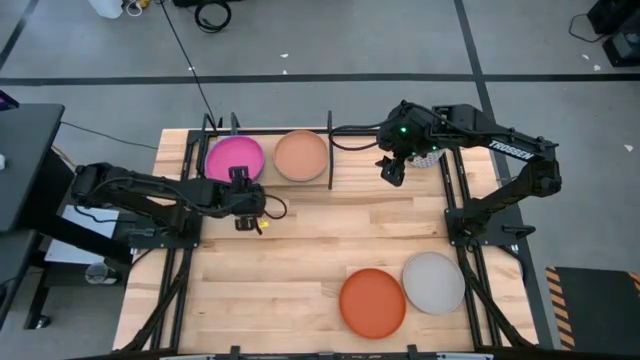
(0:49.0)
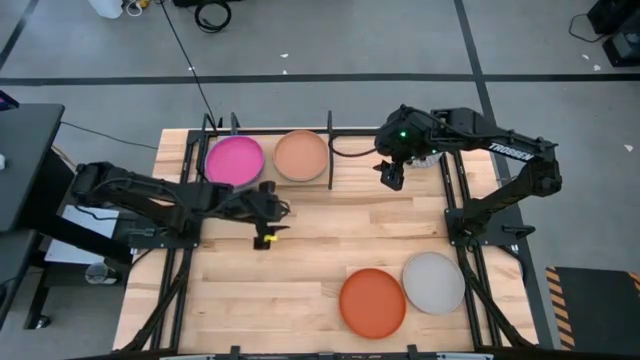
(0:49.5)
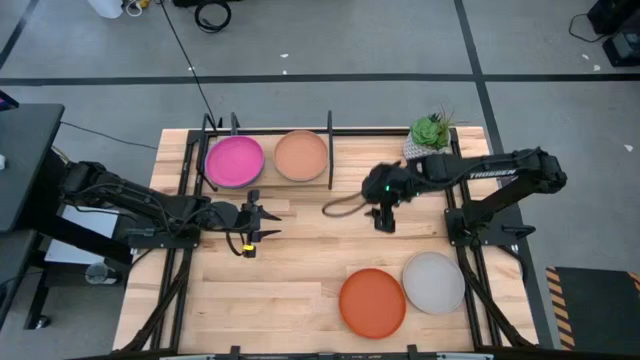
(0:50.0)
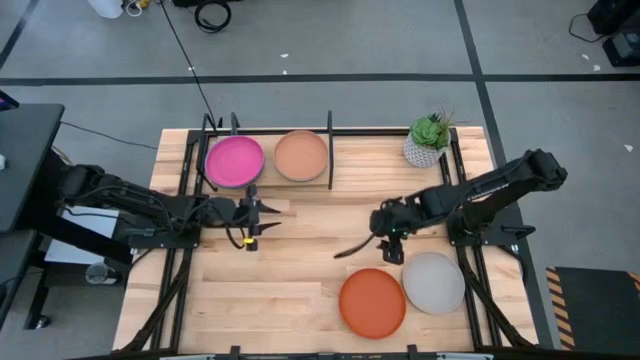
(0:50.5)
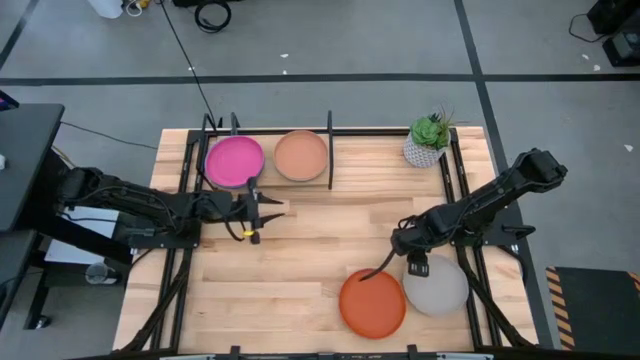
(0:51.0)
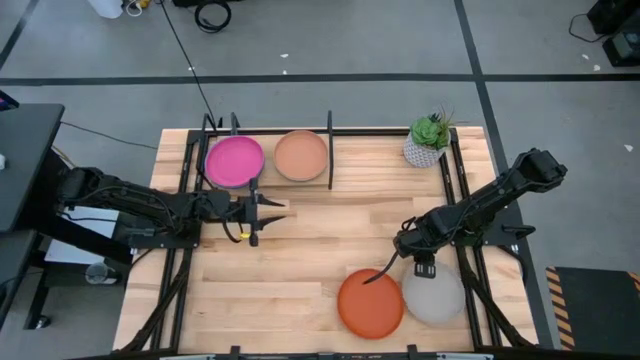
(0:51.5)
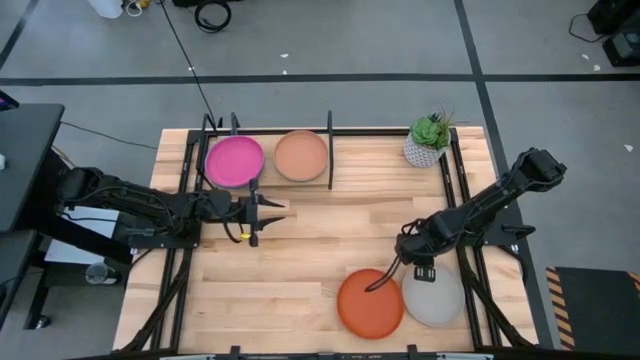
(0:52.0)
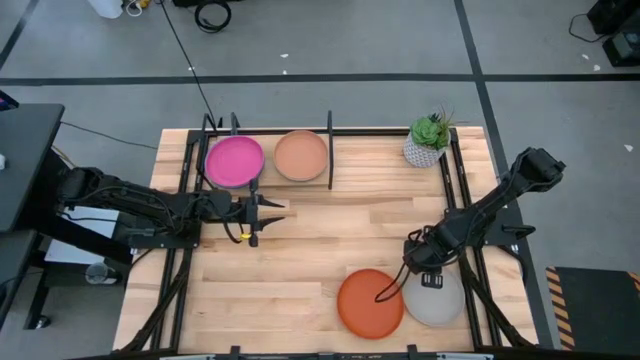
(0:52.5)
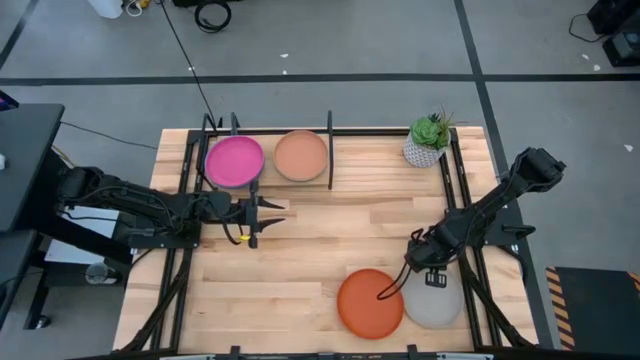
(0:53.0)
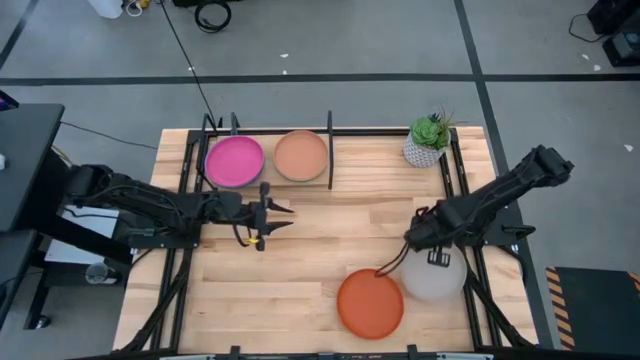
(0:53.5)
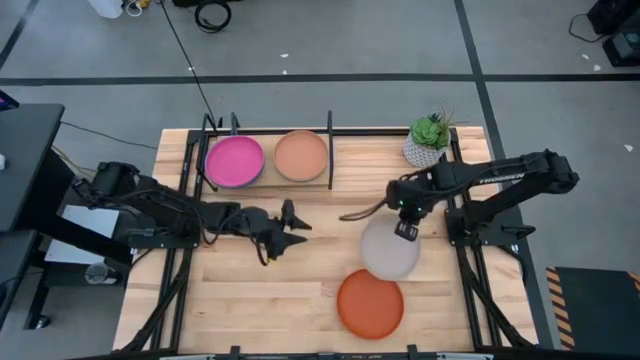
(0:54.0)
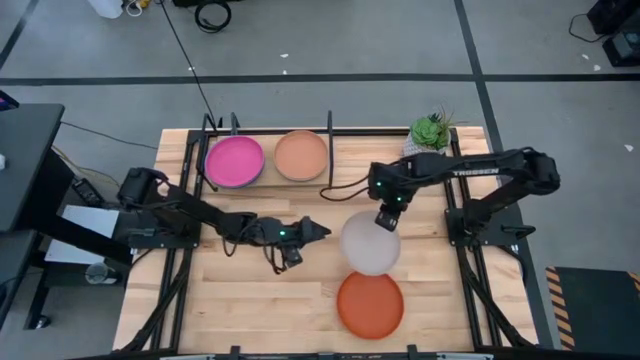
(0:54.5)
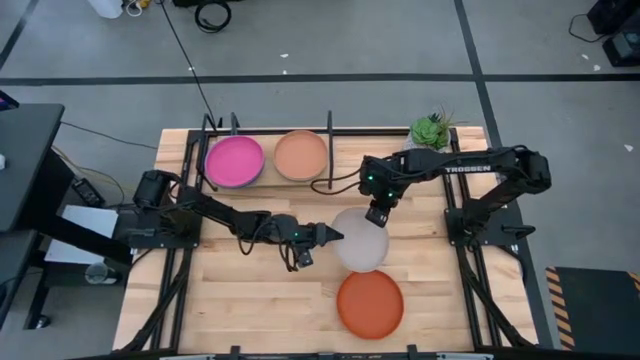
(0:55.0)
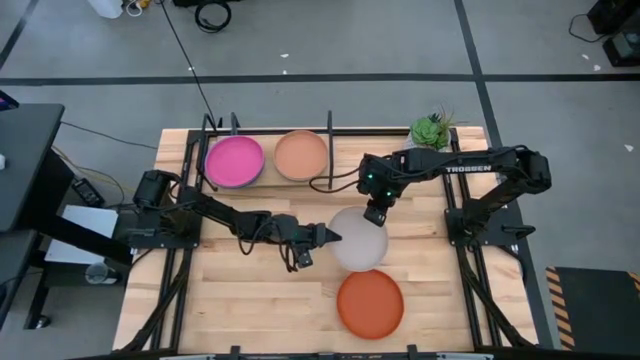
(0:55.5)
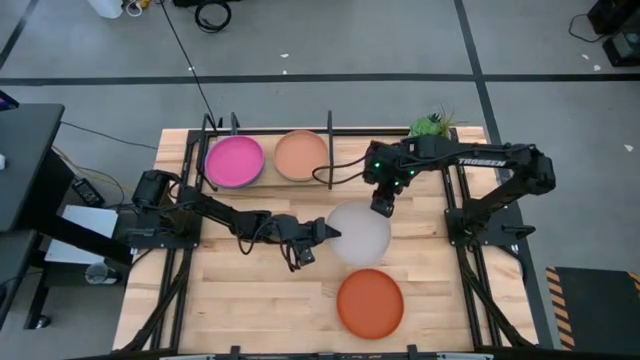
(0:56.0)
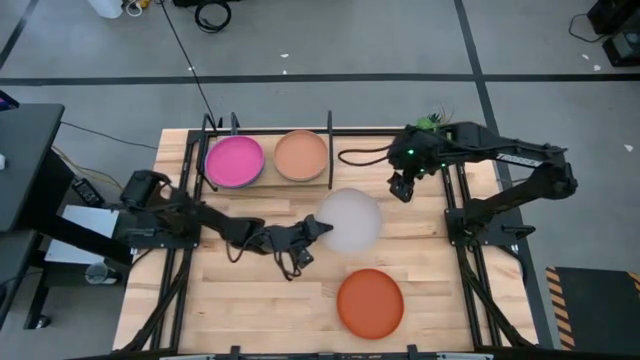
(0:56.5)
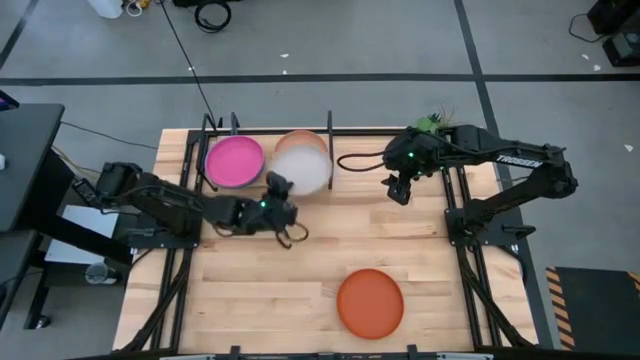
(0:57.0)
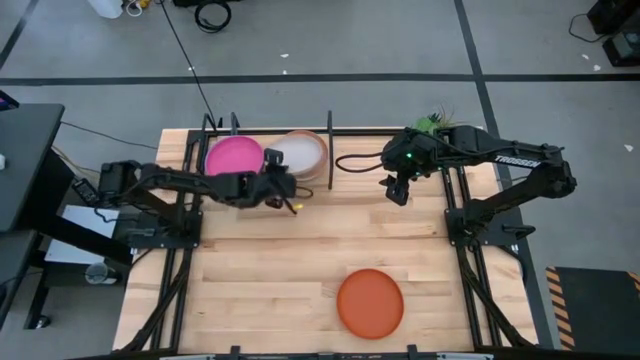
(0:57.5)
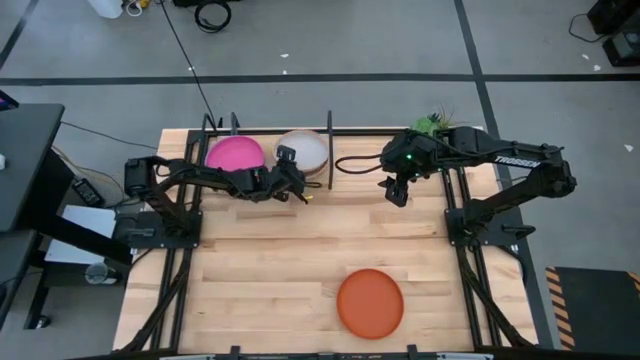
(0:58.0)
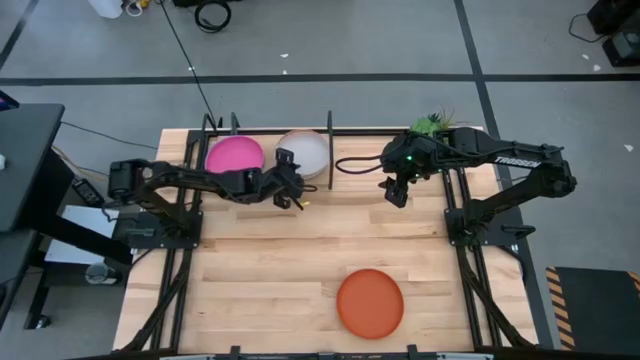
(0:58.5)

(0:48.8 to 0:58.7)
Task: Place and stack plates onto a shelf
Stack the gray plate on top of the brown plate on the shelf

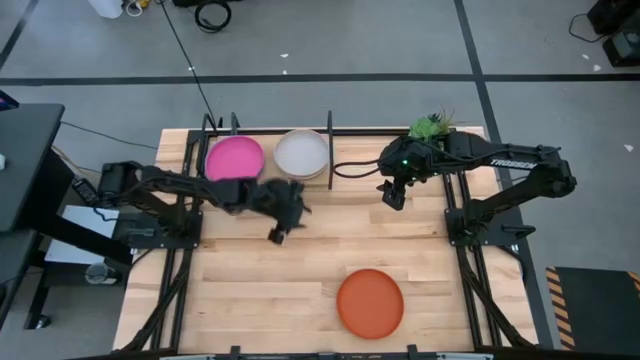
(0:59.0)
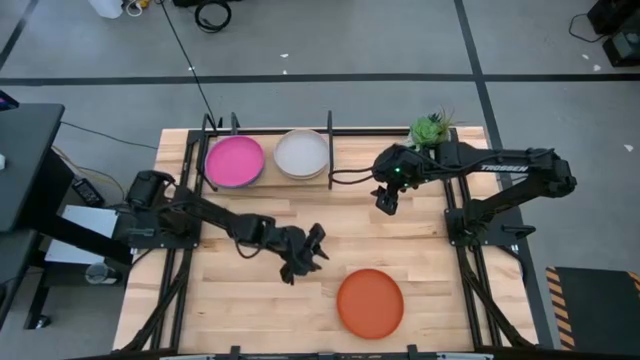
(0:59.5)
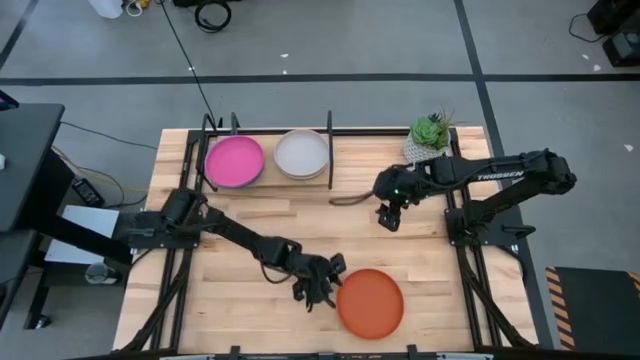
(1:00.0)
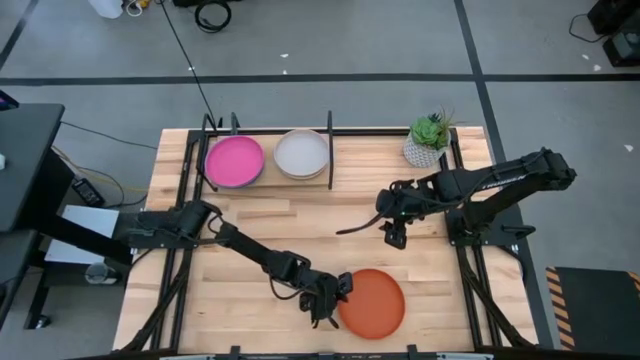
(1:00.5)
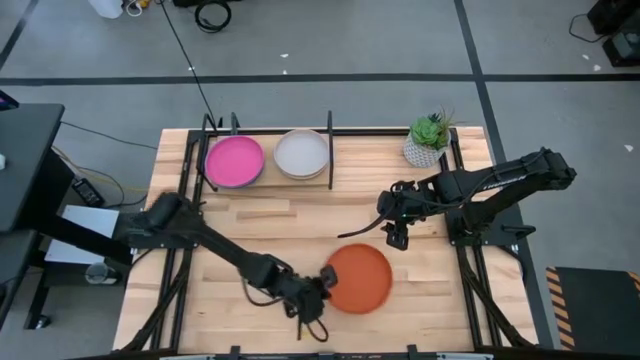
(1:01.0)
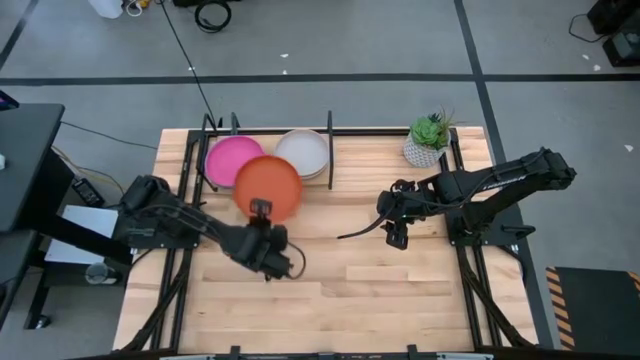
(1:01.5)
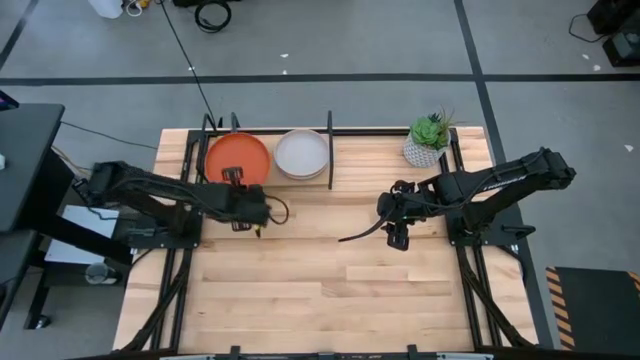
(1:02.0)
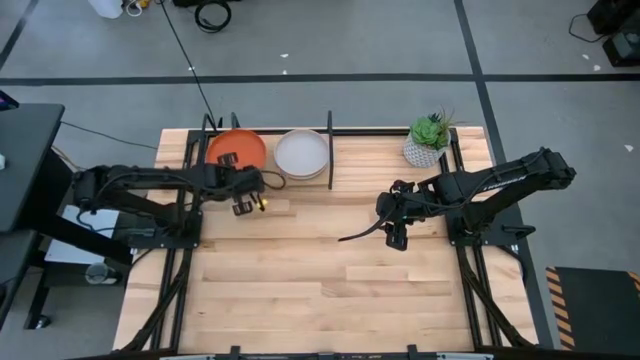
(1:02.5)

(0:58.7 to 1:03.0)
Stack the orange plate on top of the pink plate on the shelf

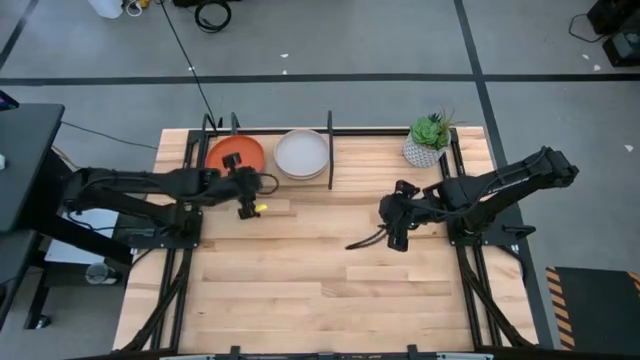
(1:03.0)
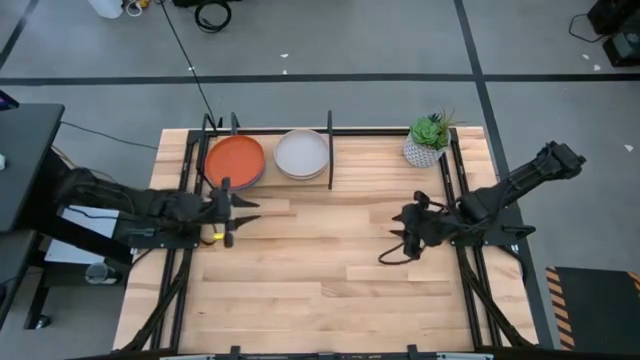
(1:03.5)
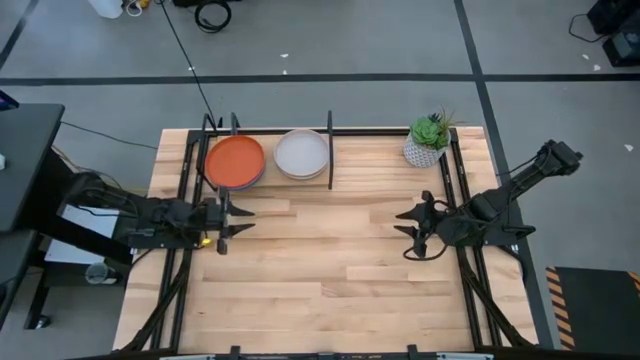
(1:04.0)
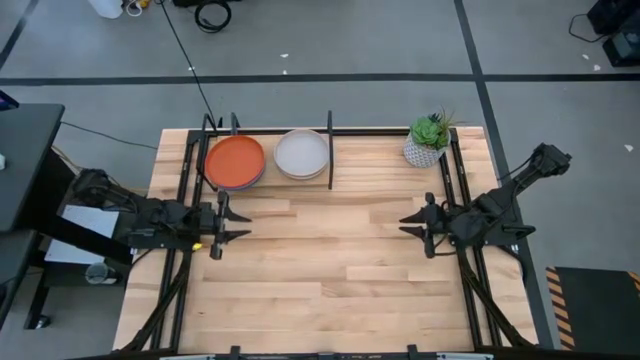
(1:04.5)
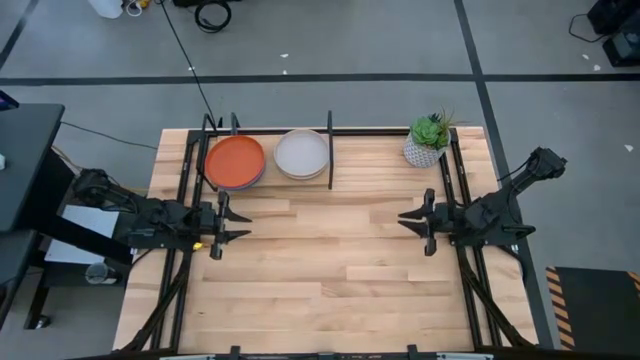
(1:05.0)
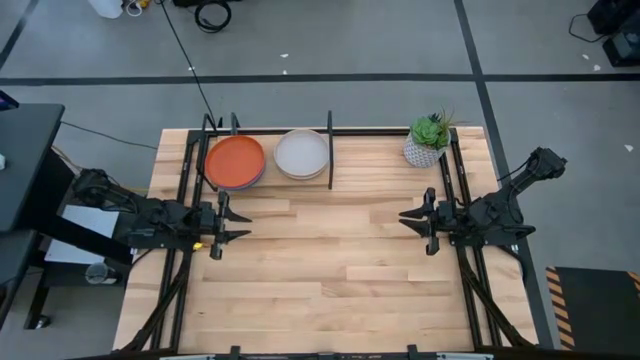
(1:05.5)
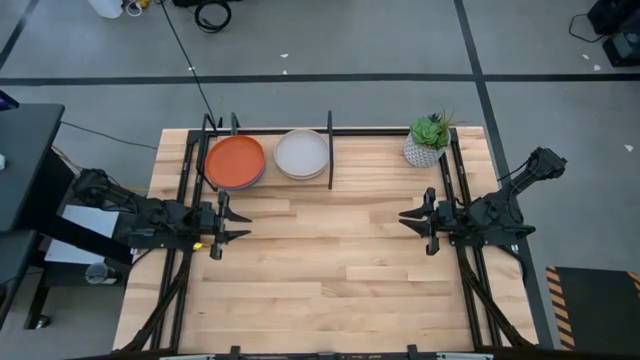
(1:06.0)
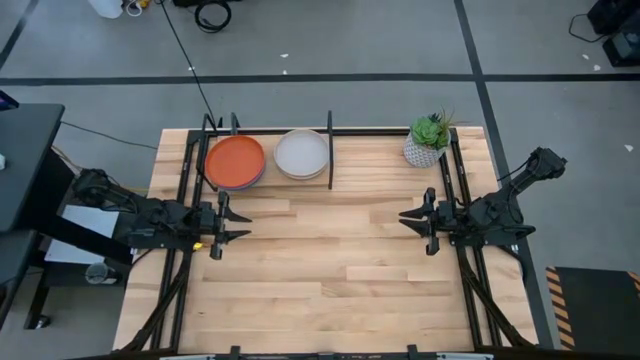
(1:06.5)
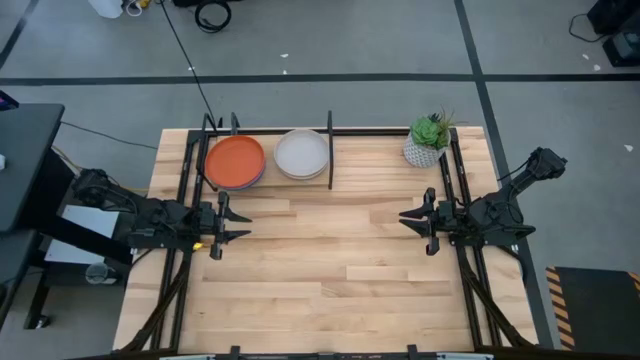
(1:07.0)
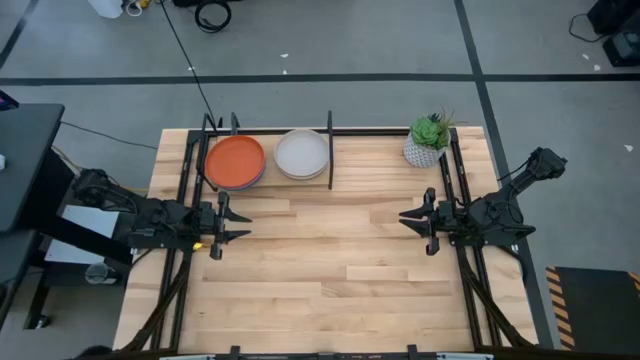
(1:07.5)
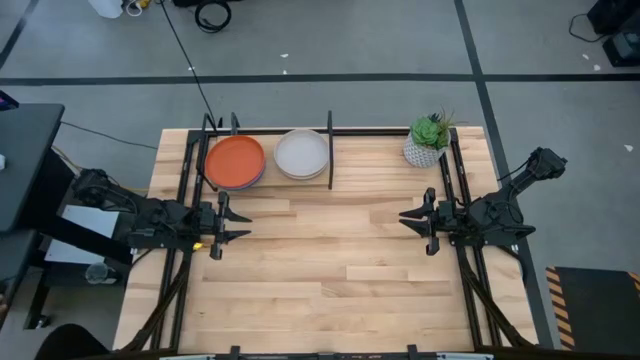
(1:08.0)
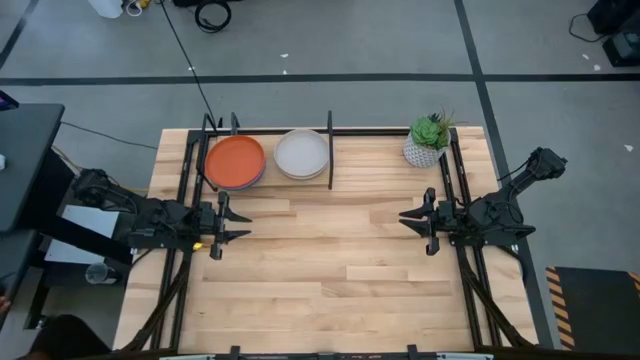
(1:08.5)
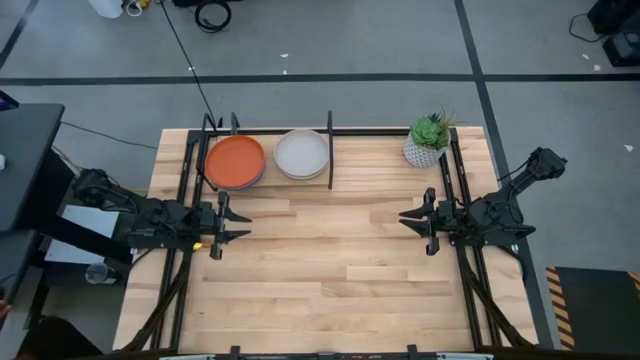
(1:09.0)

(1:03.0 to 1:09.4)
Return to Home Position

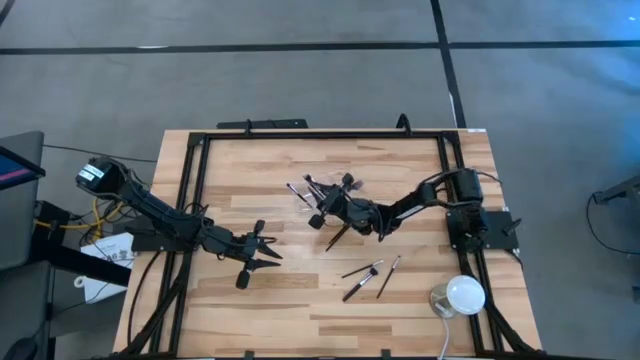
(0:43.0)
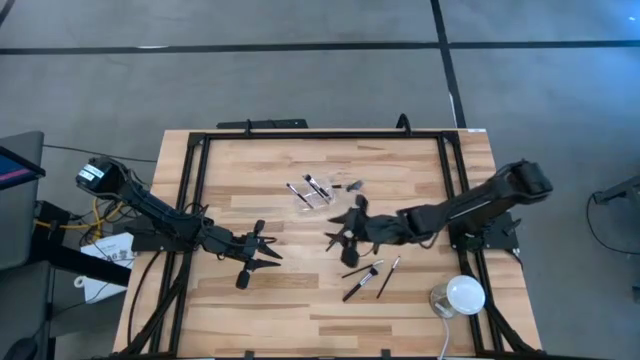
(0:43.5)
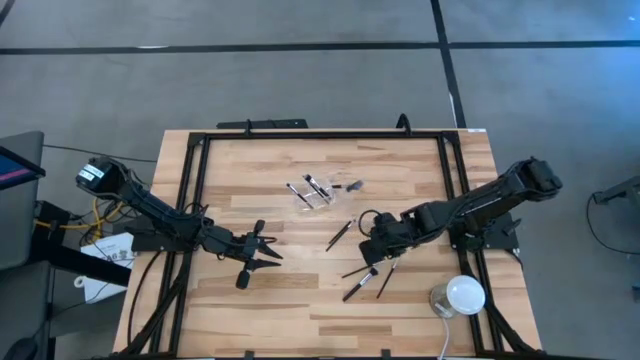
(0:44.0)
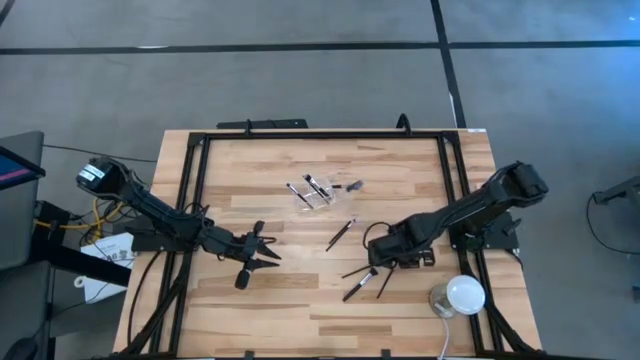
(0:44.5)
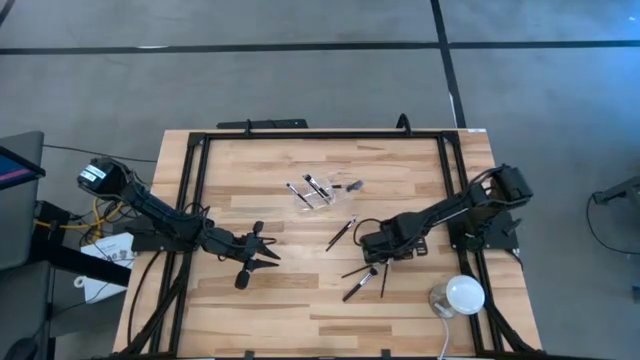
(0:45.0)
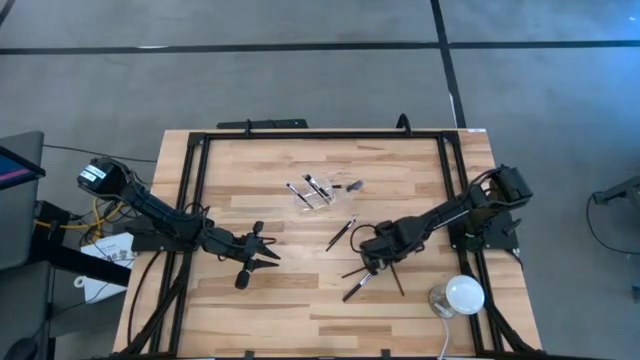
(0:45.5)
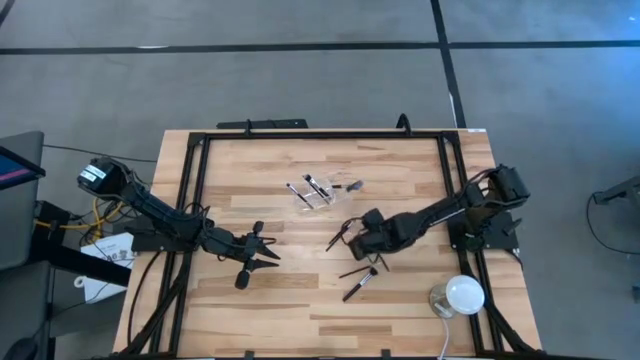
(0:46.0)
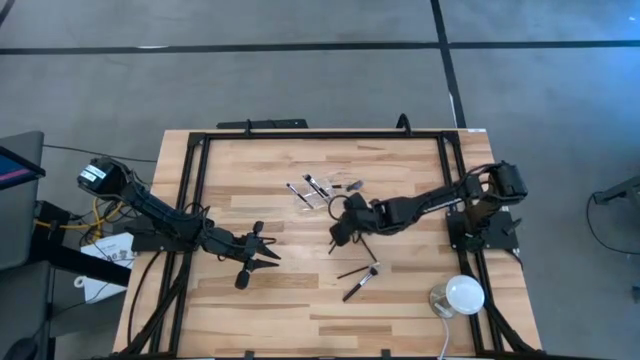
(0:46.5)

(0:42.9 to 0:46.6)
Task: Put items in baskets/containers
Put the eyeshadow brush into the transparent organizer
